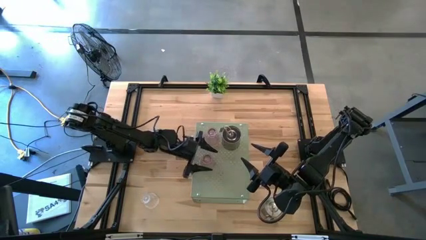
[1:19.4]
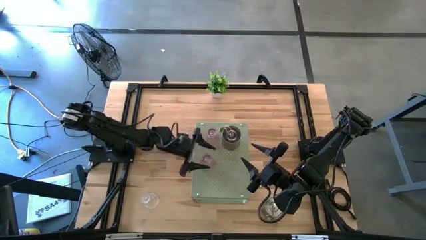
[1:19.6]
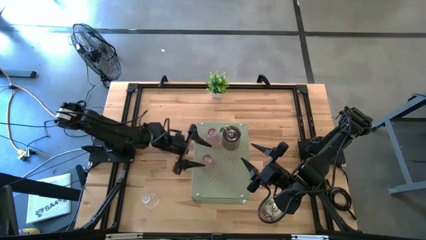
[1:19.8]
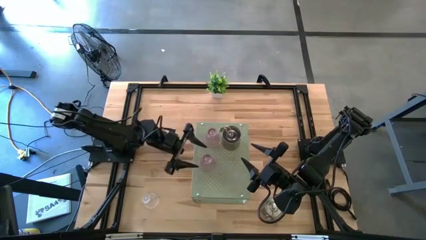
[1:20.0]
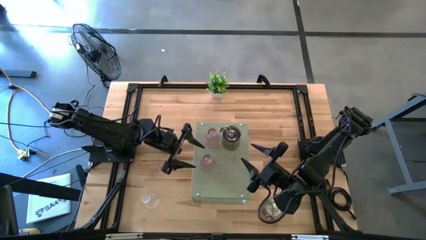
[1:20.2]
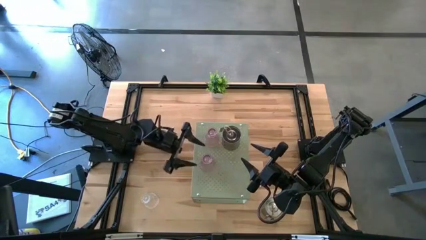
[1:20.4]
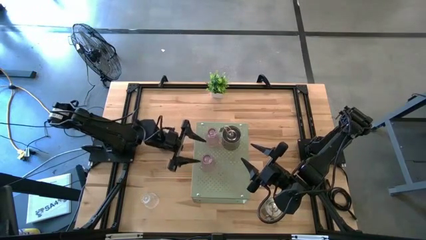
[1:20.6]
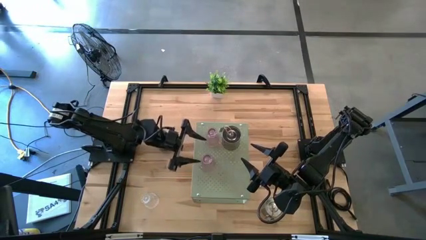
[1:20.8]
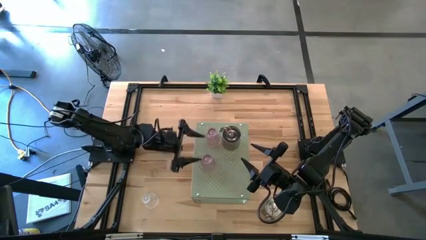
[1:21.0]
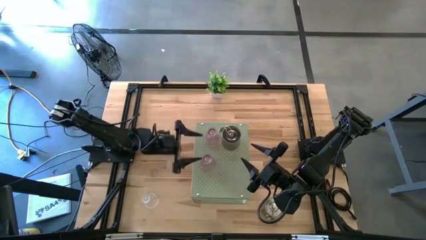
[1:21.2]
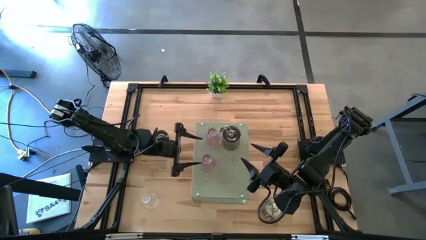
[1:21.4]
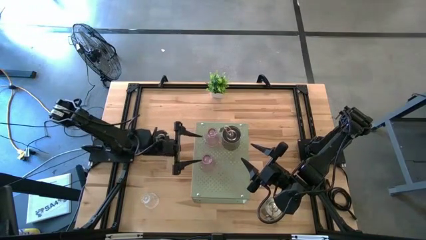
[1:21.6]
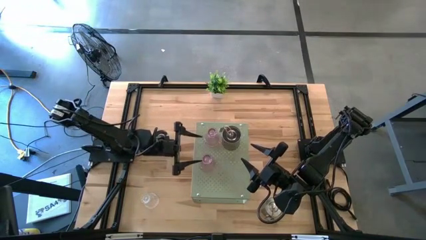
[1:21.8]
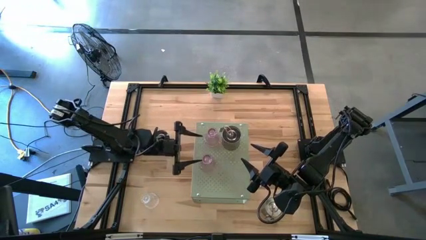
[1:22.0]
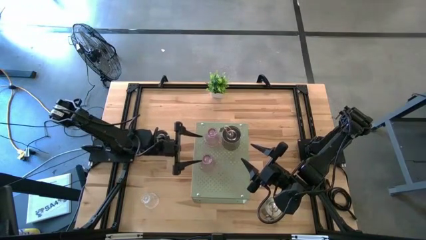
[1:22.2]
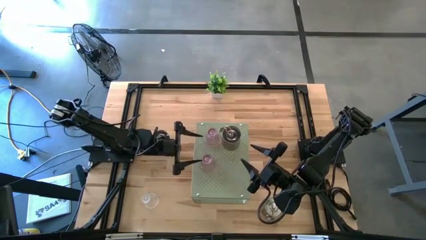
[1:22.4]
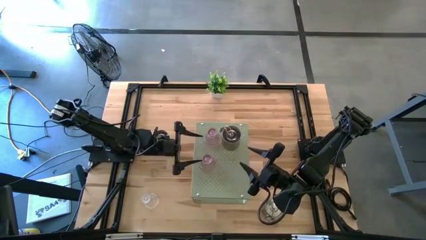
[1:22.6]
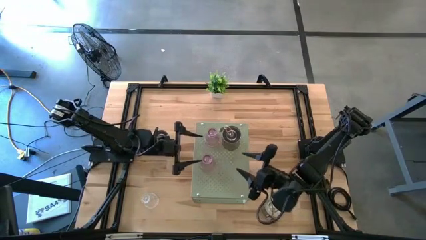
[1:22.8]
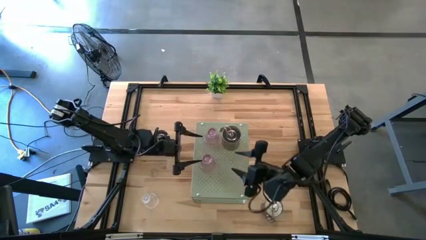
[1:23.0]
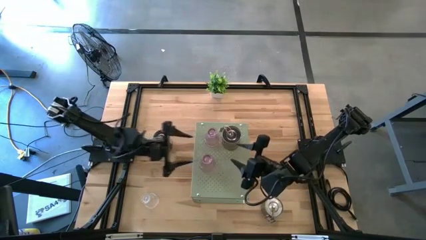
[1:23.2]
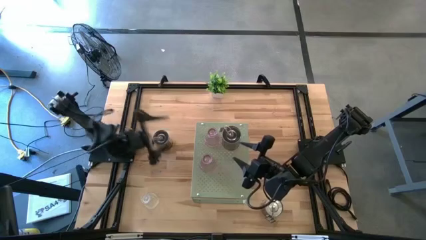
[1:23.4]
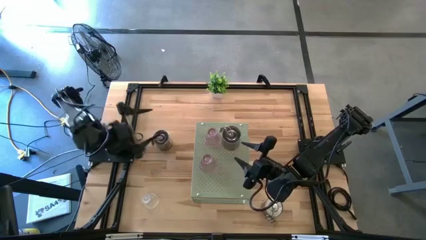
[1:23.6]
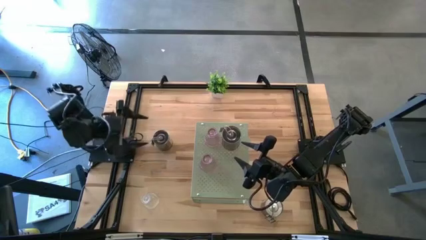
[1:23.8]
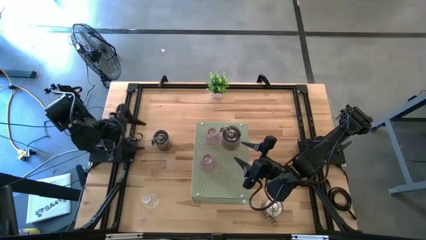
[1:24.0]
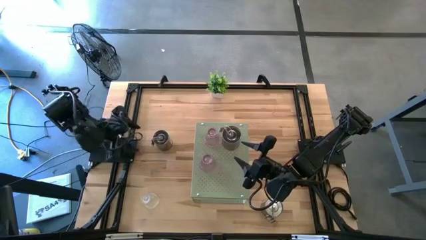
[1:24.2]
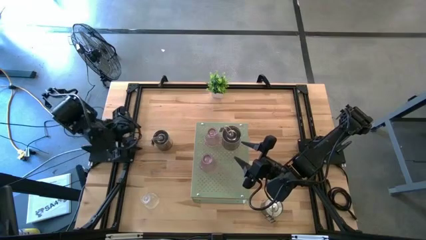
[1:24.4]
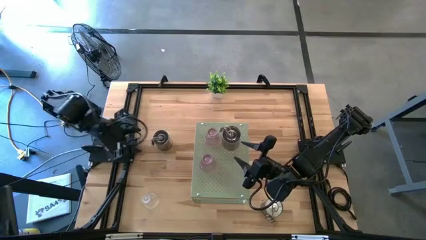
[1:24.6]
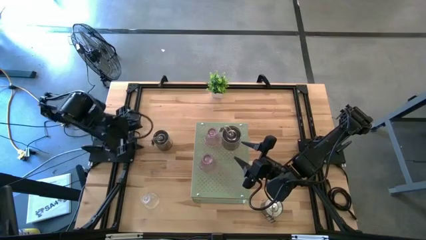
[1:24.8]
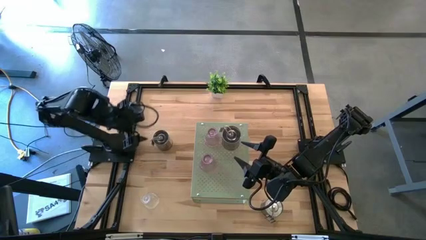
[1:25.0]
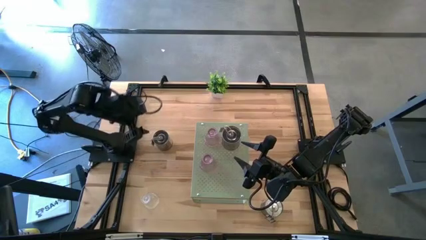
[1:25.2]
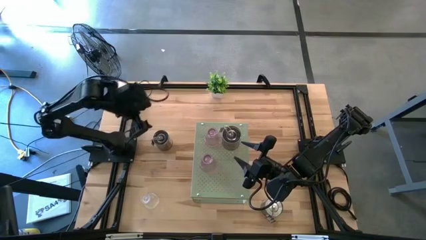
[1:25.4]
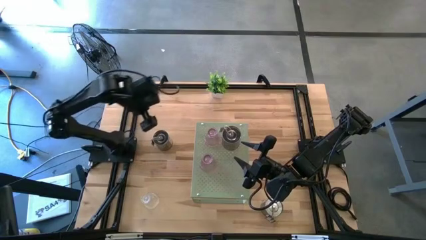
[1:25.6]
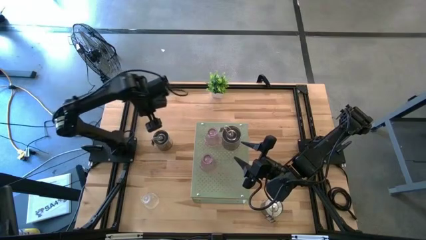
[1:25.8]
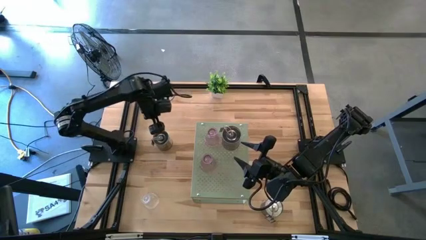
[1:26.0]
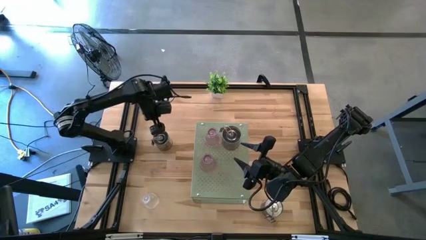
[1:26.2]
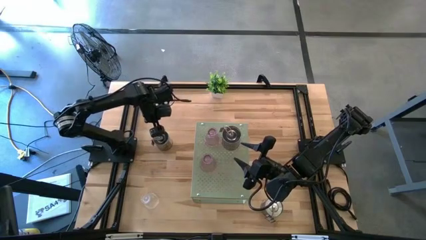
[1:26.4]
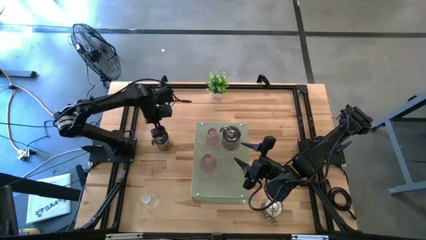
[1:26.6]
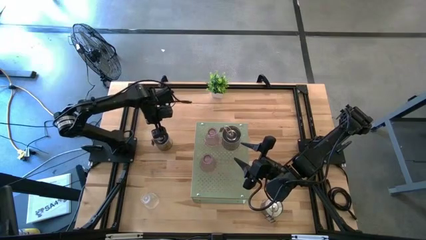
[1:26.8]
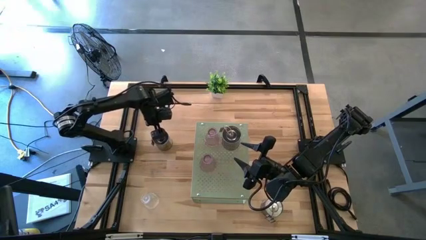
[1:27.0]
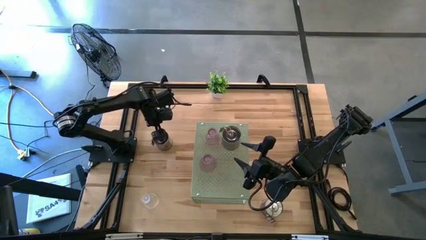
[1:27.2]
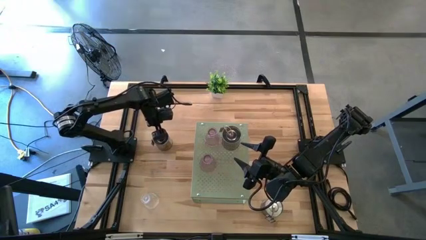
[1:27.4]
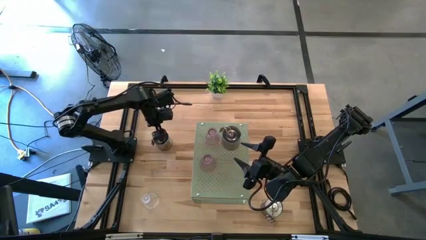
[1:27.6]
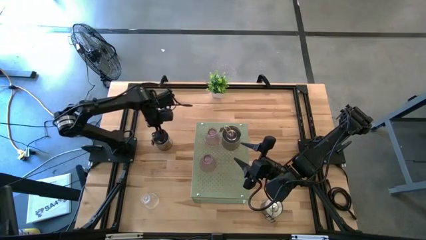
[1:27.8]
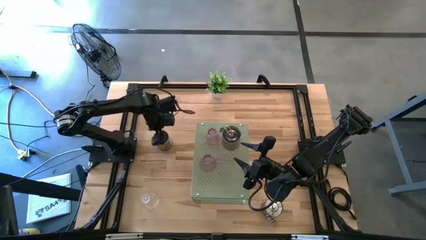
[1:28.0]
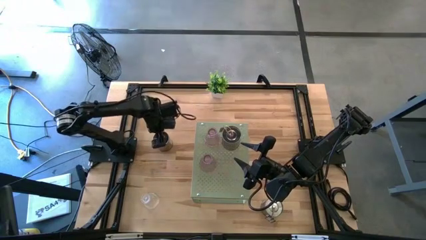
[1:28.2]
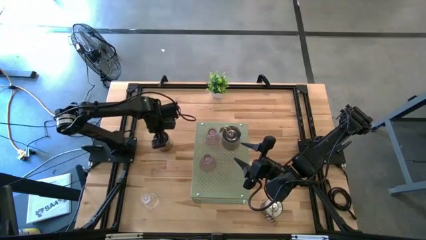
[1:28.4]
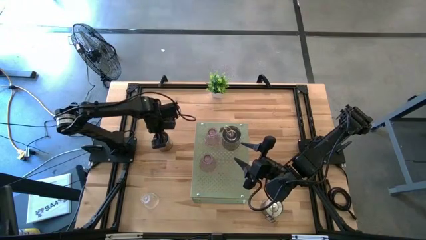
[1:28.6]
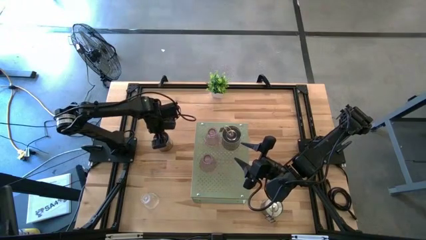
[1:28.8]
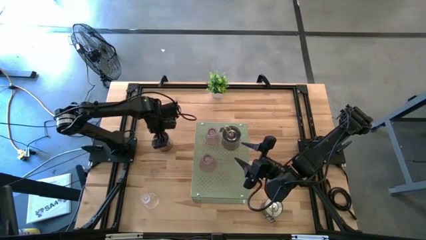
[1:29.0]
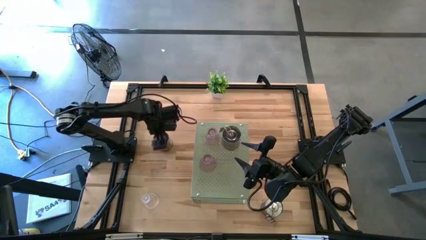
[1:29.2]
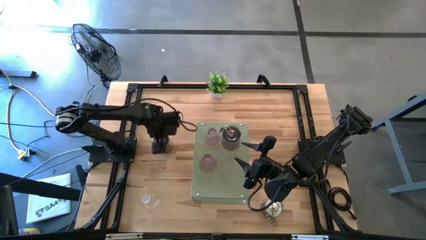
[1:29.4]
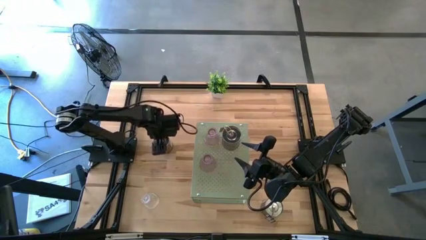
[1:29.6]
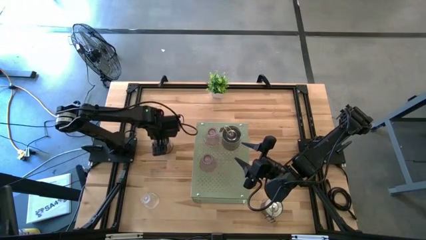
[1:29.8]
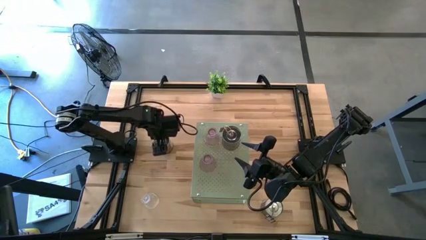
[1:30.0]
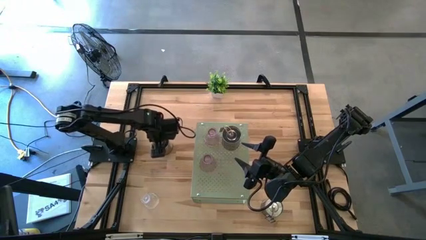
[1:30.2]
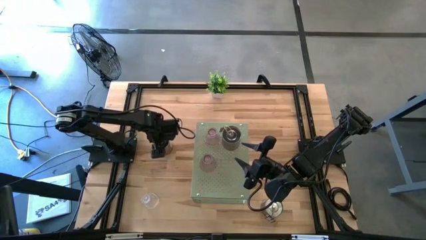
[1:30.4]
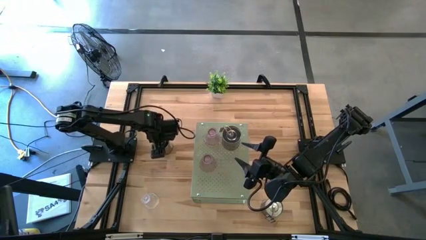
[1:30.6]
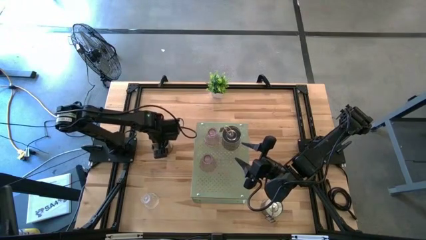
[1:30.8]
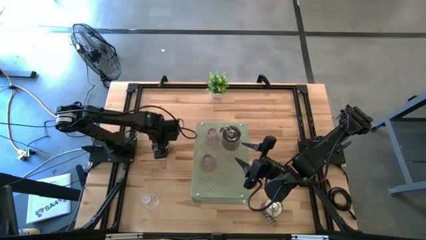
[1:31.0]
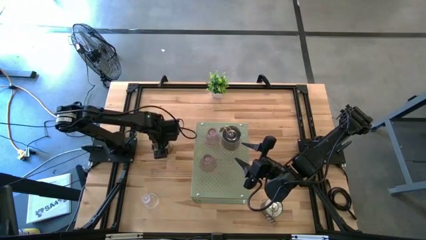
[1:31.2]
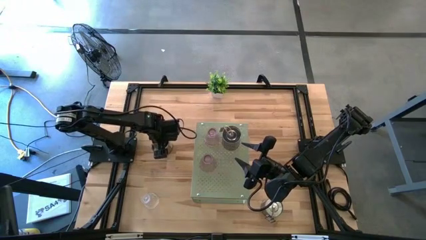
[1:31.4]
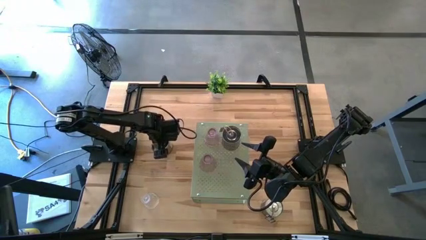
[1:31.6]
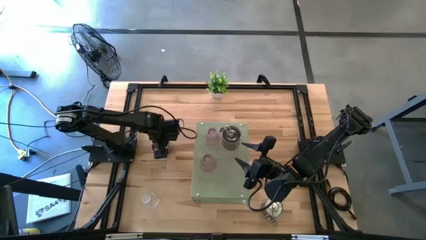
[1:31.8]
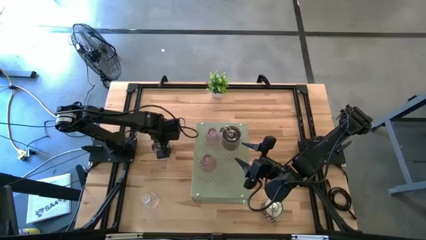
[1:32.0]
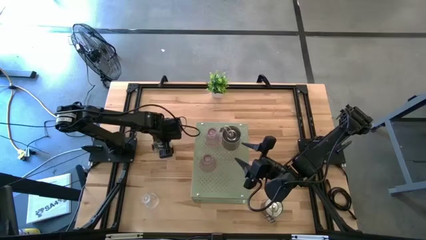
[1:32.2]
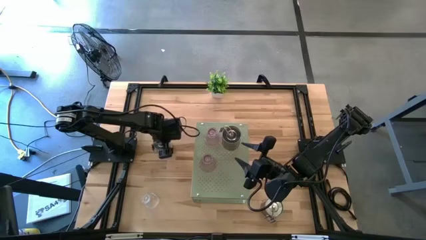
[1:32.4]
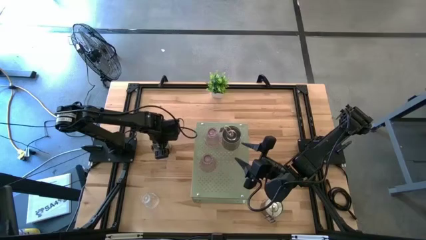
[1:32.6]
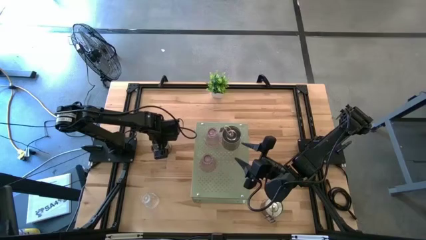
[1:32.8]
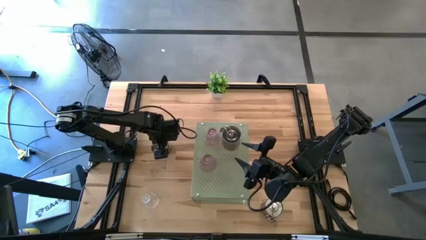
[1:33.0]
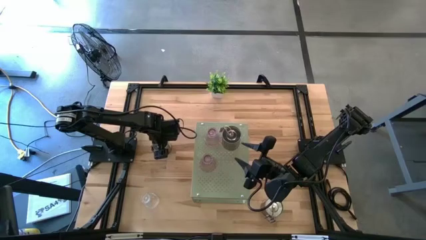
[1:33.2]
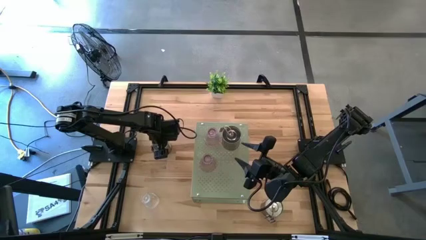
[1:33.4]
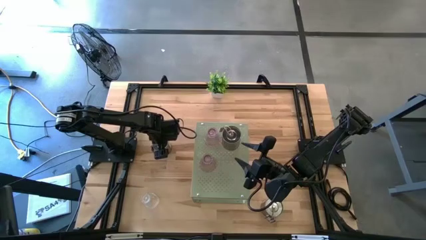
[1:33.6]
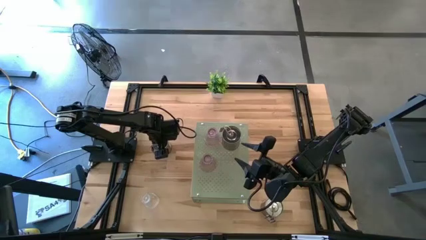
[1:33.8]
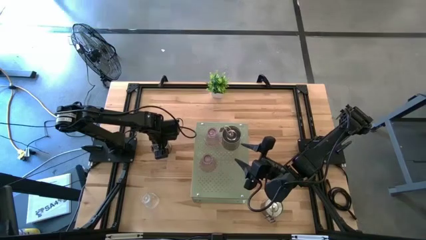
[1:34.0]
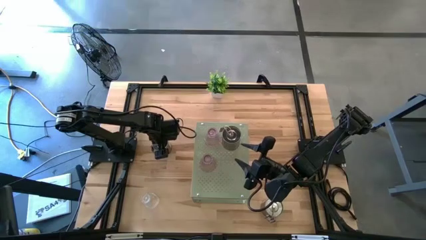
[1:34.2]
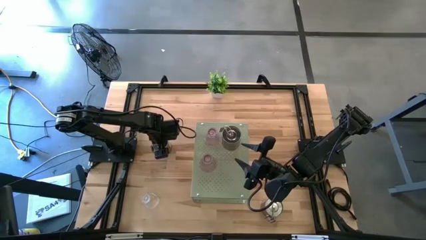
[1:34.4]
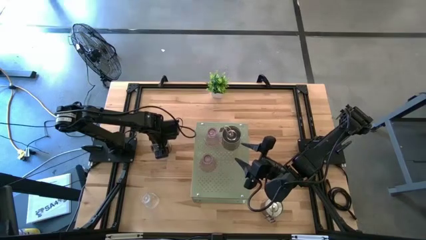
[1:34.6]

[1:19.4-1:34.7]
Task: Pick & Place candle stick holders
Put the top silver scented candle on the shelf
